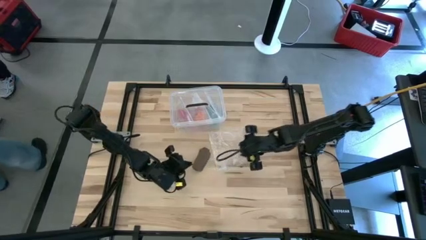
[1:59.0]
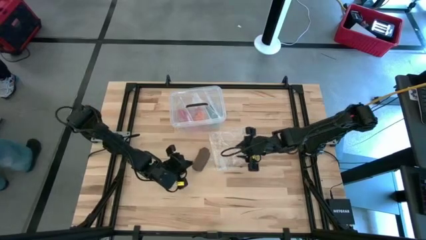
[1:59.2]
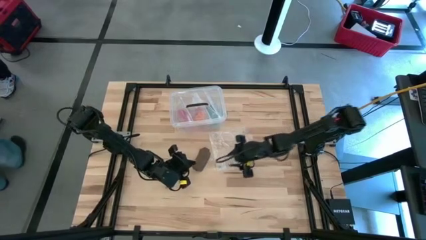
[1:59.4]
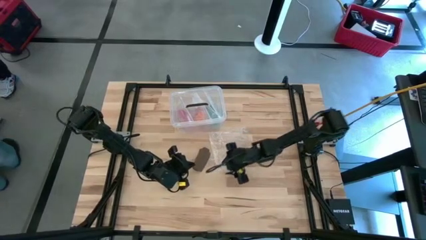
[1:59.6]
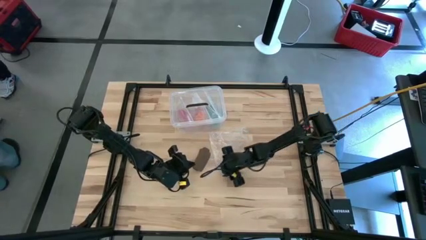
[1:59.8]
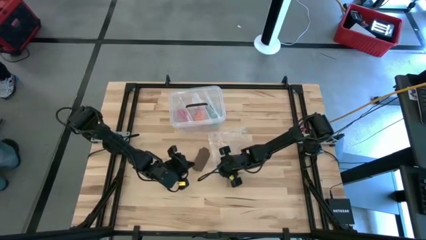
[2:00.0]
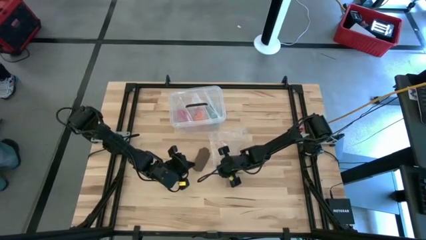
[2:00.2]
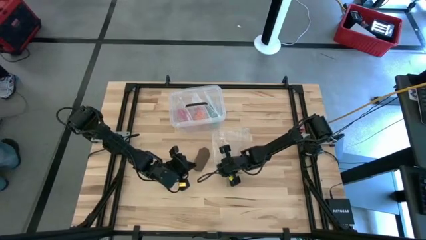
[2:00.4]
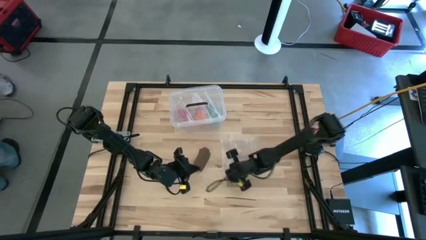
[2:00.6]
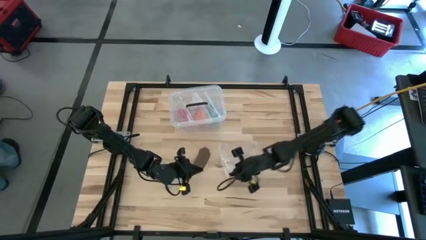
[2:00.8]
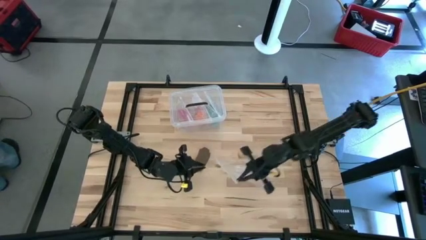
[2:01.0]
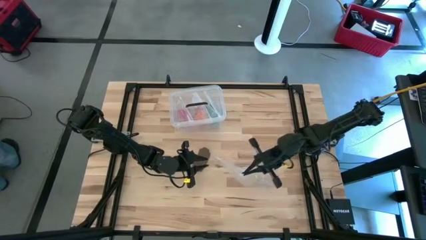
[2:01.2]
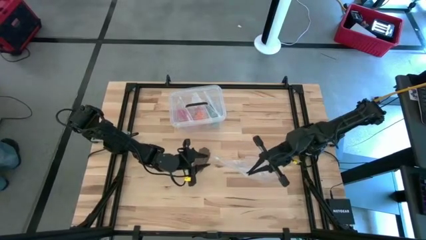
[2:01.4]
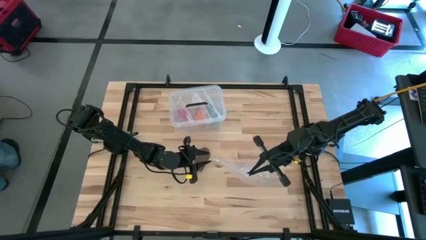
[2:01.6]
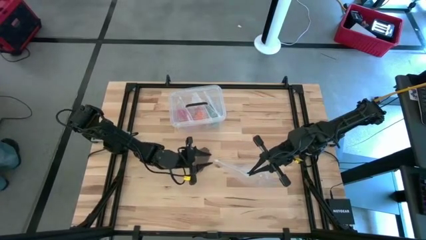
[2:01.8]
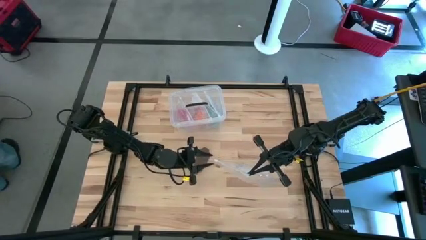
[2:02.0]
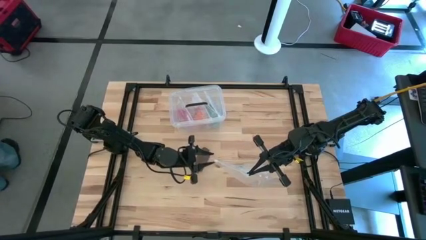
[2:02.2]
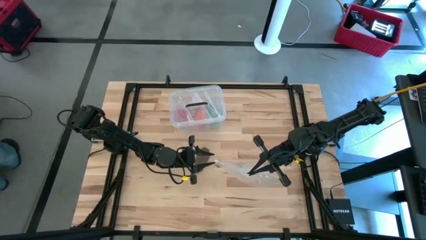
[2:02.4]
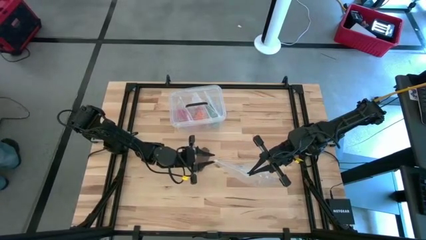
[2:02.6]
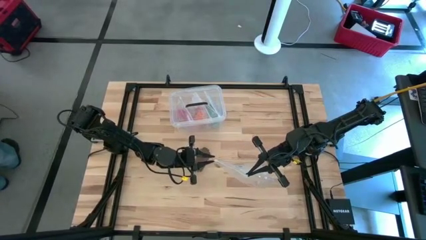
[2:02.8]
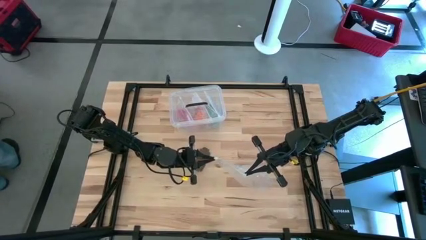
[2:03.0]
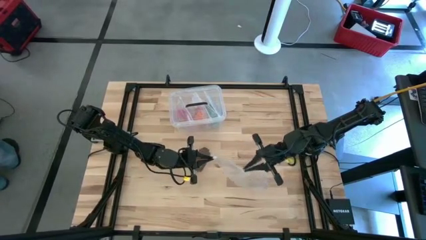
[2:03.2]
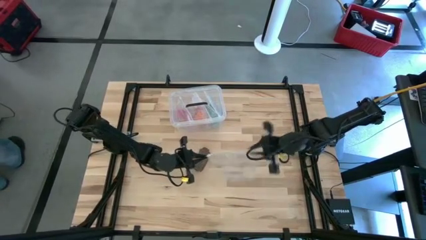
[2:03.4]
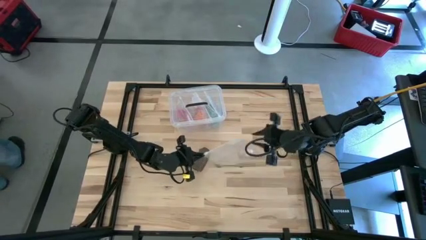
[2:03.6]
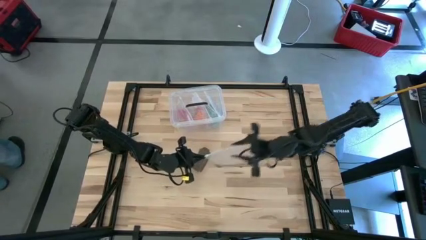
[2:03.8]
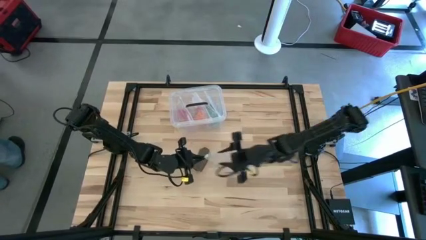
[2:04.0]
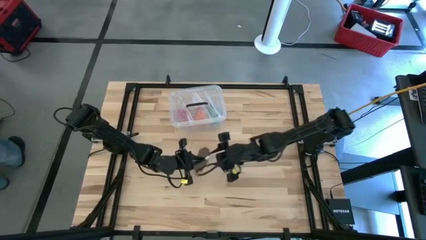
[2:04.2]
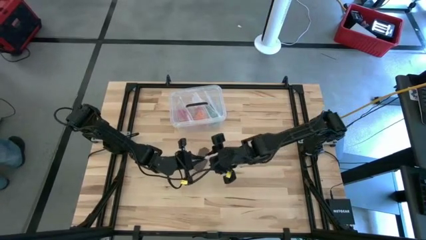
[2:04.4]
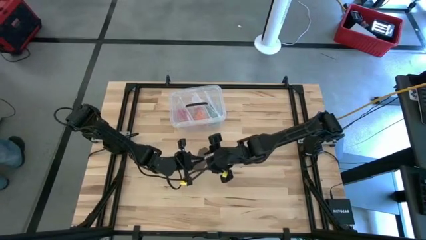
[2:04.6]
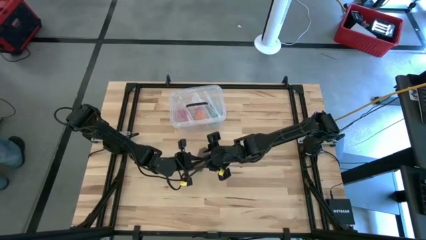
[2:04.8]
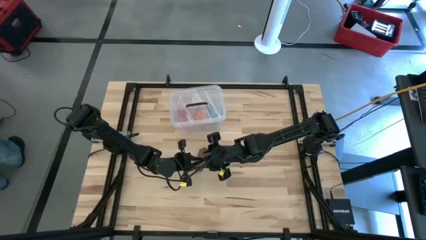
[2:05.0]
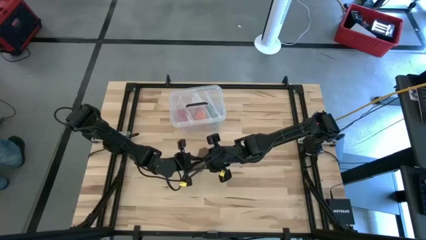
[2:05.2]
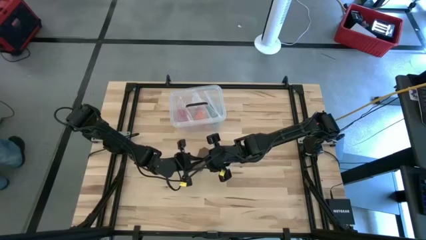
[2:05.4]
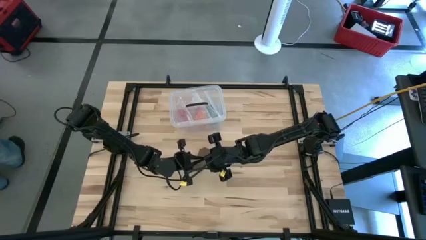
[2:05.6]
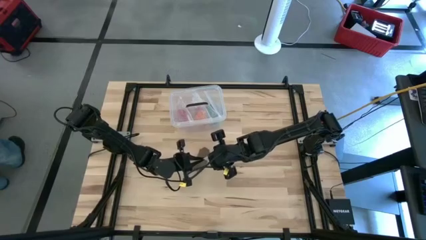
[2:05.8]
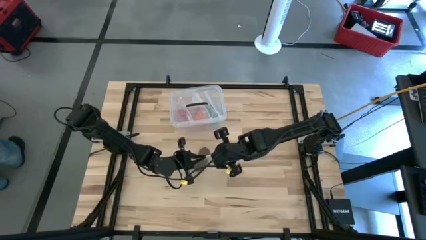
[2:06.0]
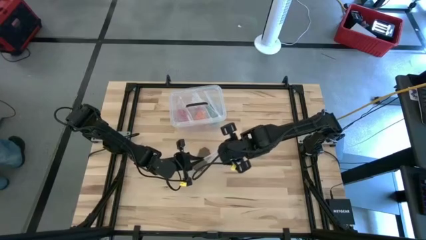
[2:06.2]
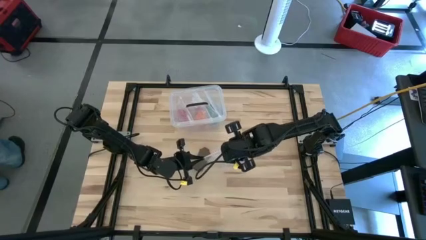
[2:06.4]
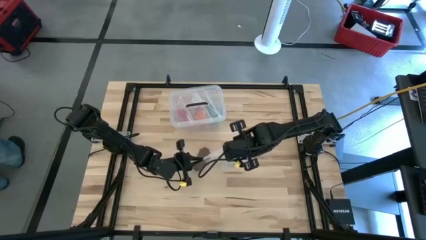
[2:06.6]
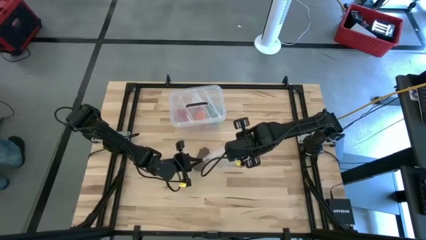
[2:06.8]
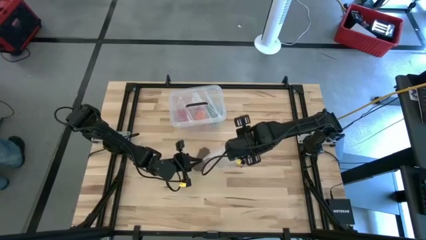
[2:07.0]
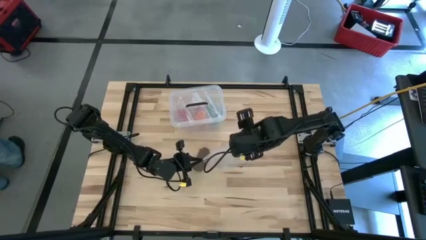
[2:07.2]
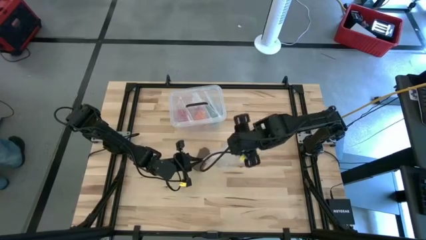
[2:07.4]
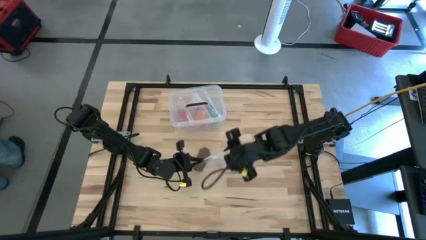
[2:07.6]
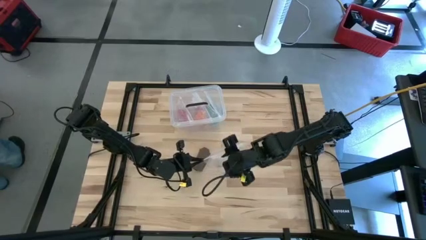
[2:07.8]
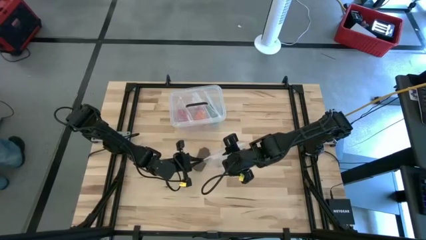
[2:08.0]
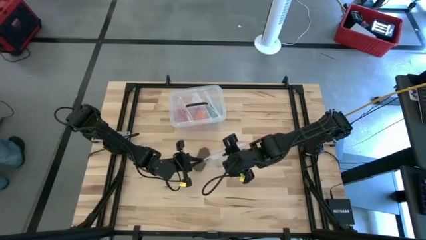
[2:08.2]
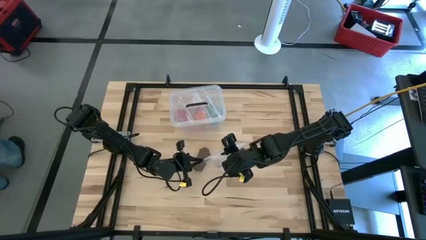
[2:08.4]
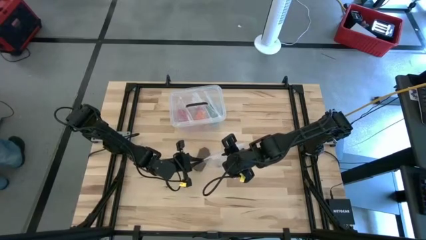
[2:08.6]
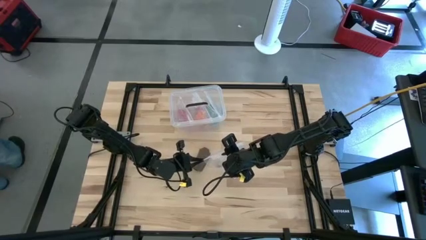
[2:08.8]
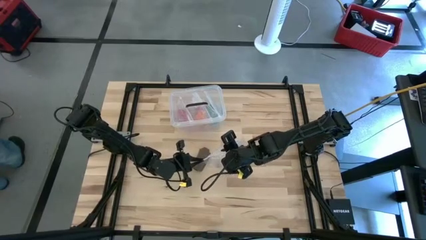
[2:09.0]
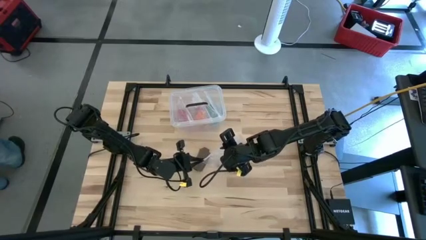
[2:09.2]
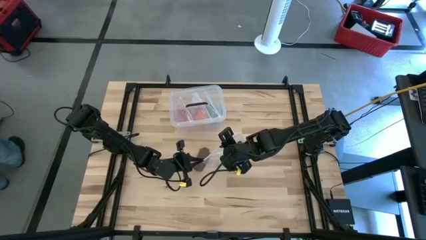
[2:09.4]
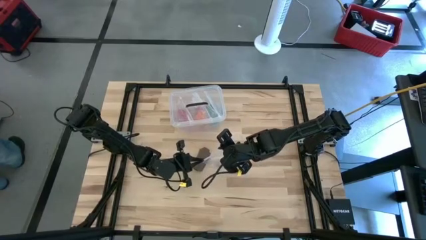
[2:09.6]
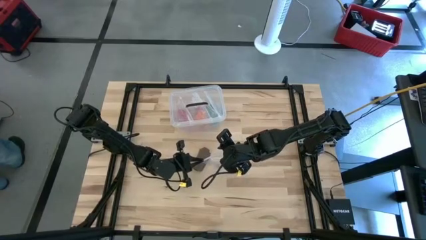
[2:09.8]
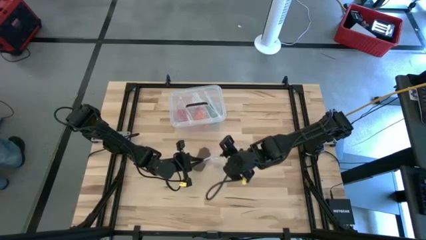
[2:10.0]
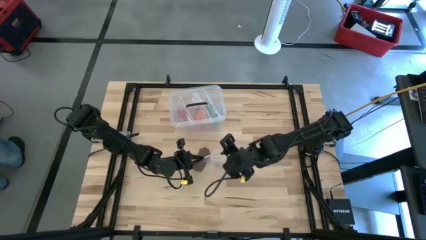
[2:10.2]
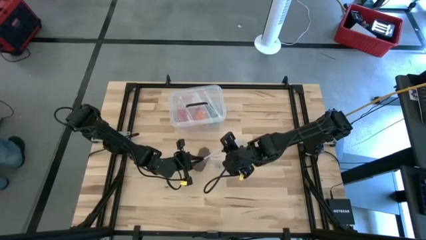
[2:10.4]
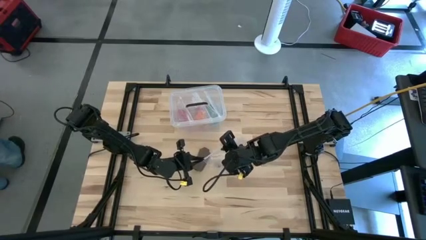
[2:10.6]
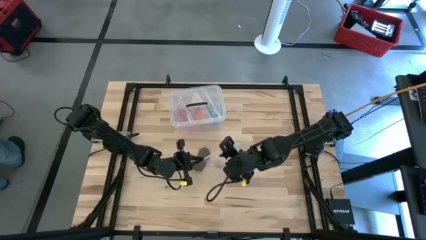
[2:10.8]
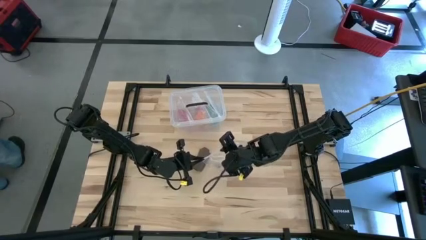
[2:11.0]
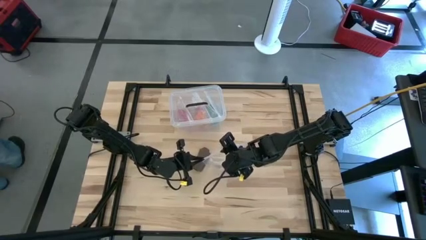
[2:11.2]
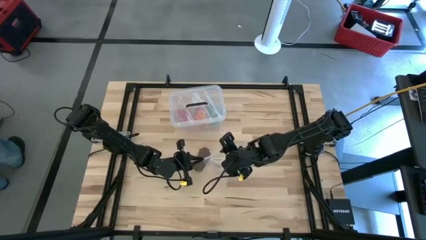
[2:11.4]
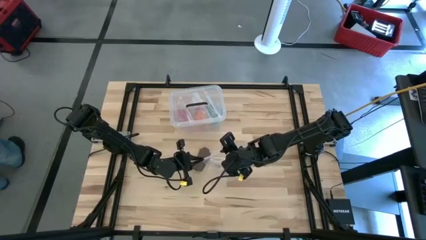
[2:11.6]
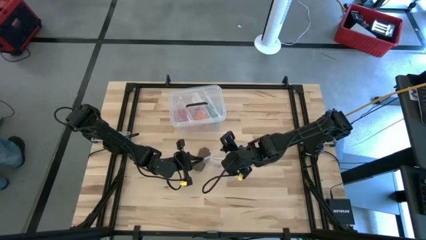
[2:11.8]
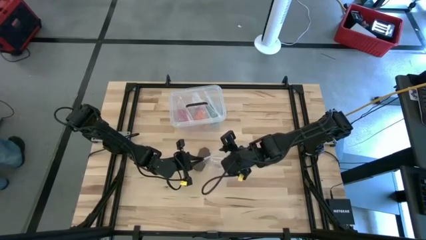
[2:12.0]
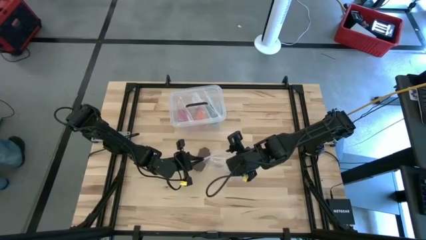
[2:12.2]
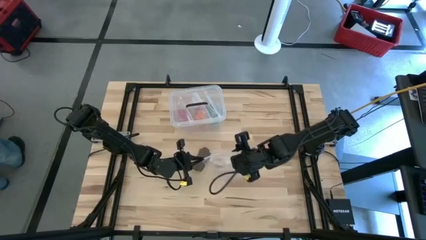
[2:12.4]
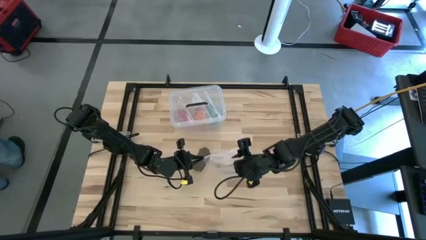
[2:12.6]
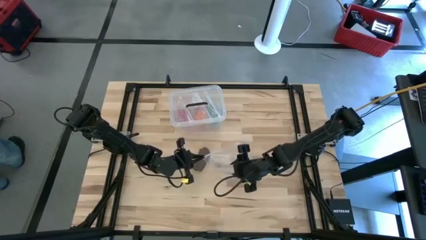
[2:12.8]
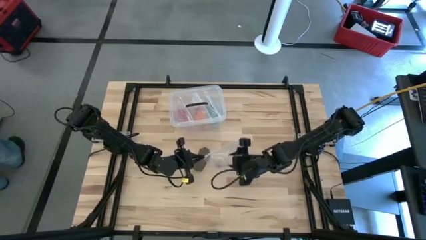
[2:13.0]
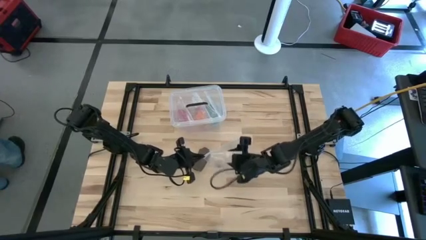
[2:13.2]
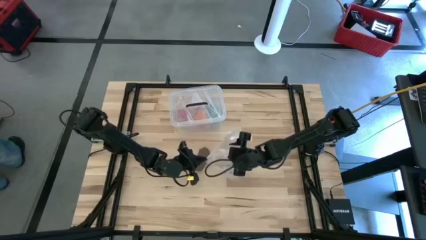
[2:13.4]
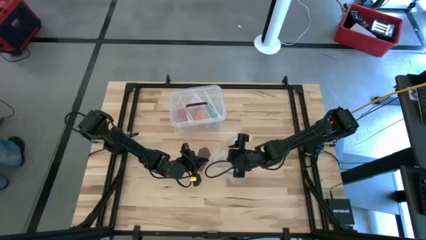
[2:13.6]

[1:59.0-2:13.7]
Task: Roll bandage
Open the transparent zip bag

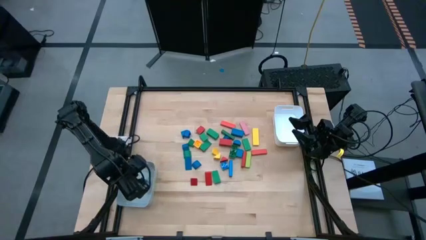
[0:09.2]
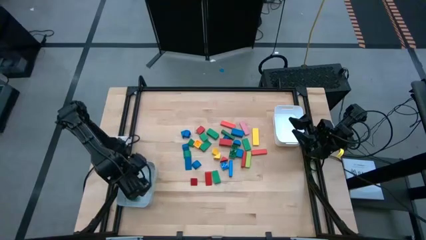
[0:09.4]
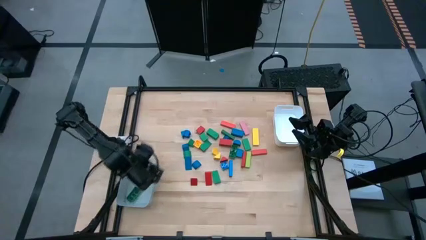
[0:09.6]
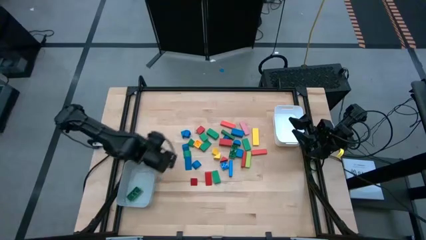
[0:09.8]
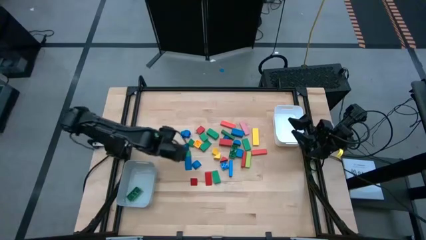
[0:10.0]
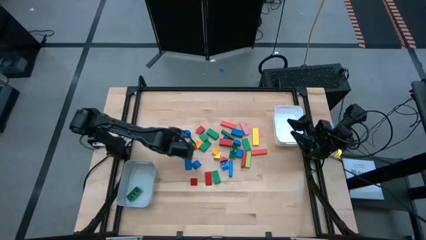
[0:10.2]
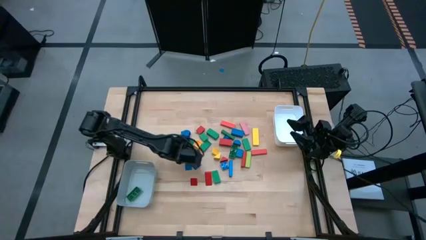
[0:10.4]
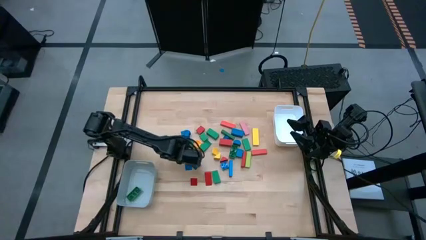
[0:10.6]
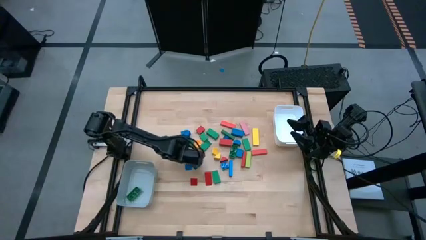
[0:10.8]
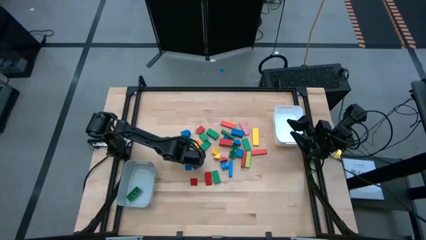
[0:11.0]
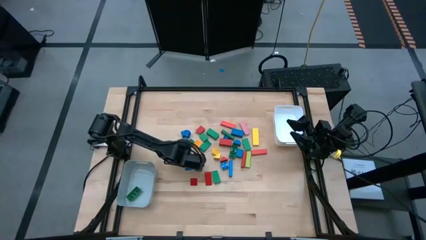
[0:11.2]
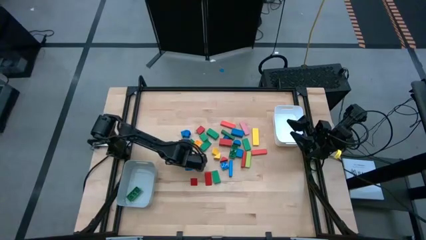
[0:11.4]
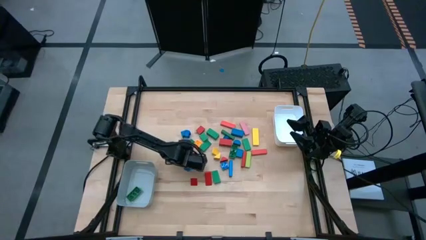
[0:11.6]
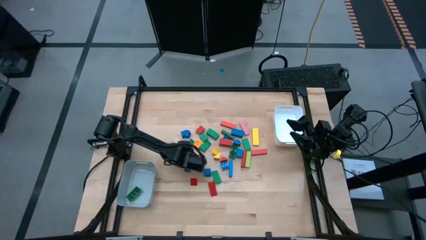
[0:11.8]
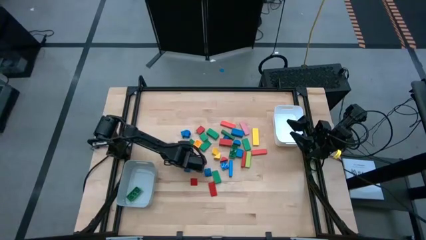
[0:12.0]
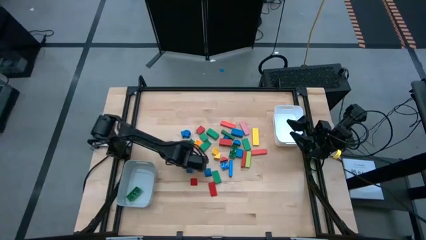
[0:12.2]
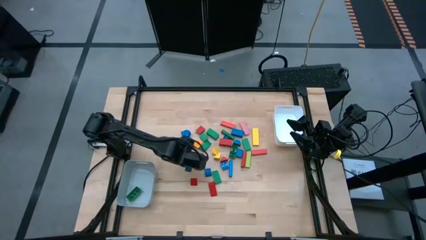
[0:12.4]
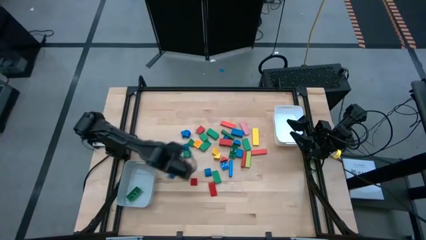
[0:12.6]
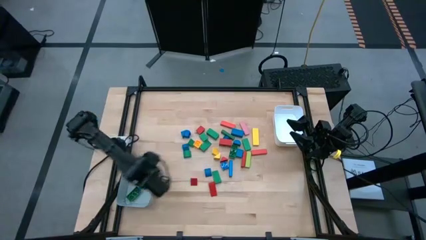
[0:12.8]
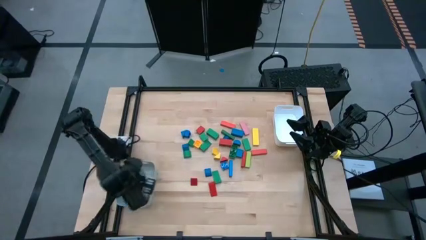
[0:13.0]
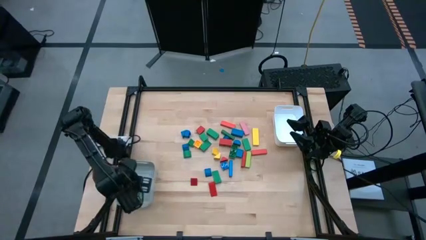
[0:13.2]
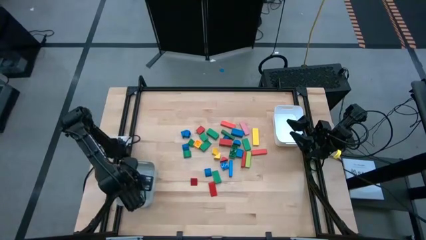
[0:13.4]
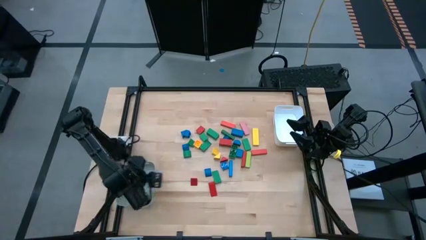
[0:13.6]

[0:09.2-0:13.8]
Task: Sort blocks by size
Put the blue block into the gray bin
